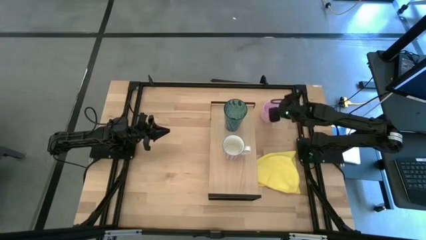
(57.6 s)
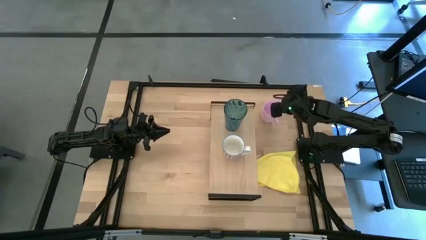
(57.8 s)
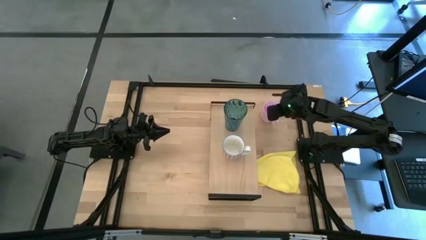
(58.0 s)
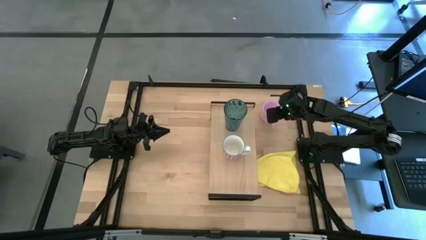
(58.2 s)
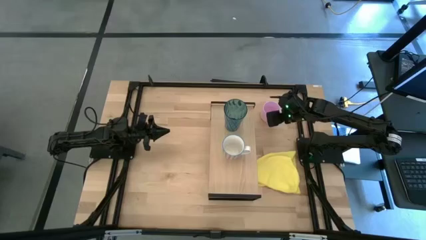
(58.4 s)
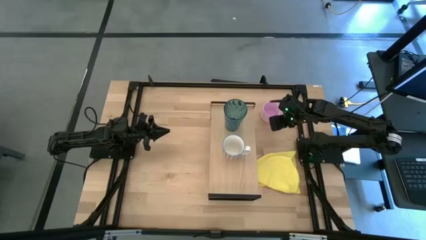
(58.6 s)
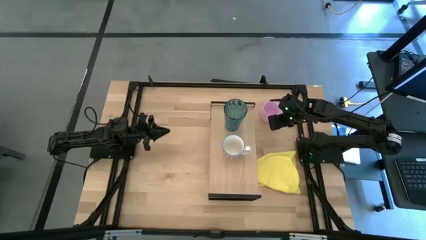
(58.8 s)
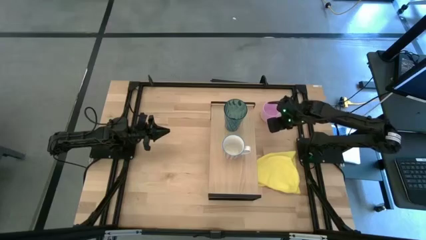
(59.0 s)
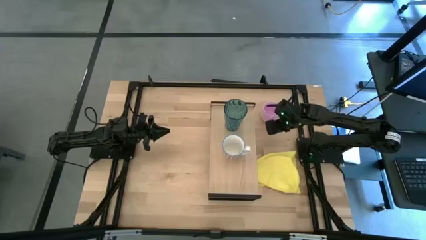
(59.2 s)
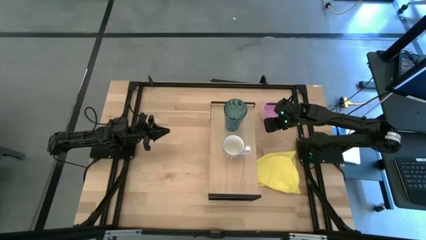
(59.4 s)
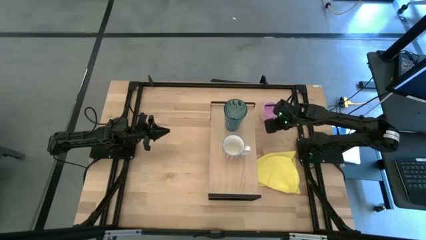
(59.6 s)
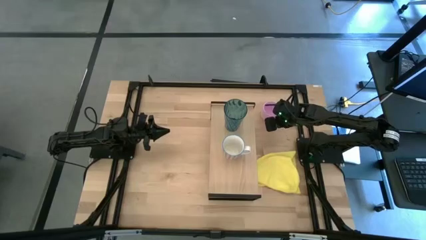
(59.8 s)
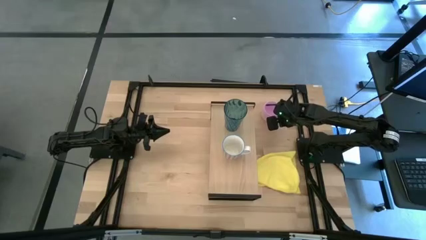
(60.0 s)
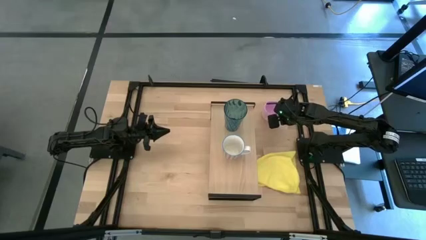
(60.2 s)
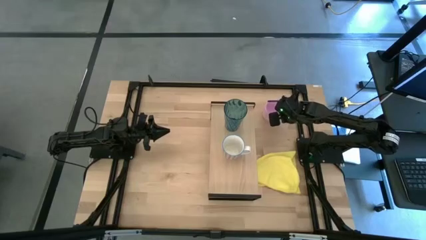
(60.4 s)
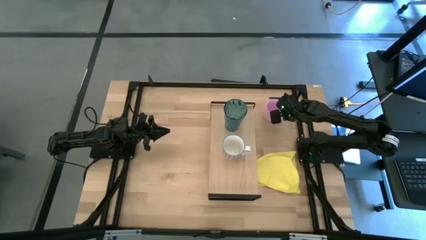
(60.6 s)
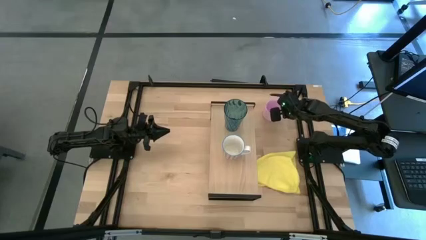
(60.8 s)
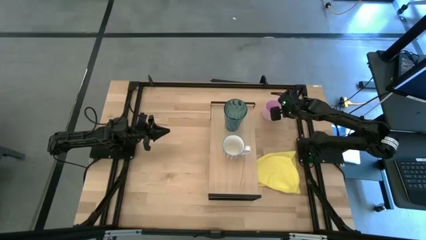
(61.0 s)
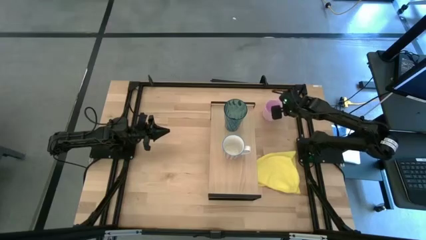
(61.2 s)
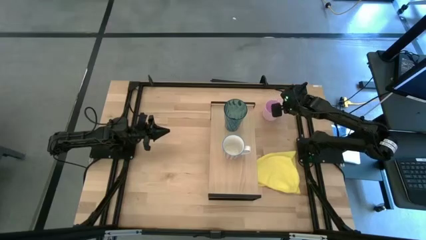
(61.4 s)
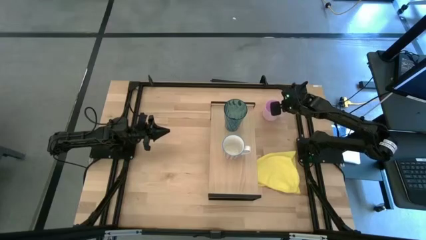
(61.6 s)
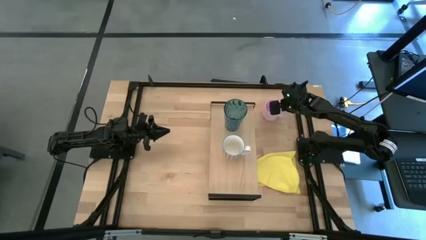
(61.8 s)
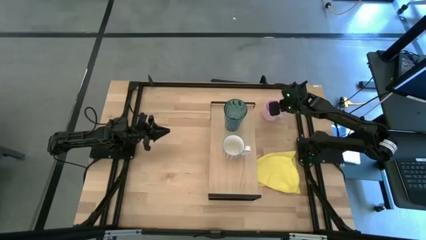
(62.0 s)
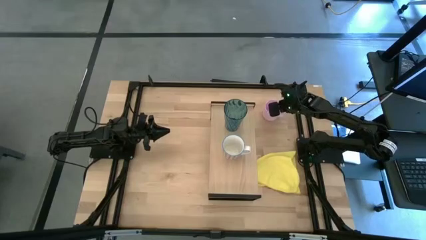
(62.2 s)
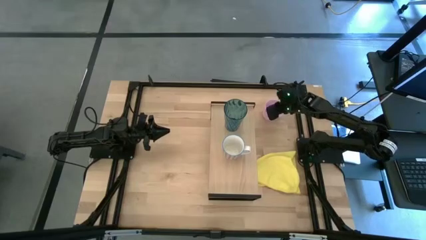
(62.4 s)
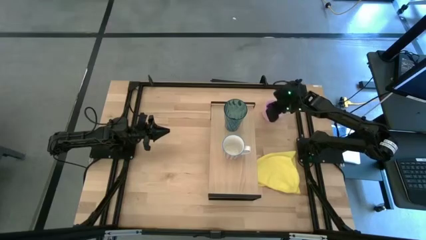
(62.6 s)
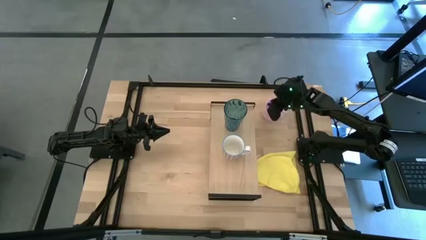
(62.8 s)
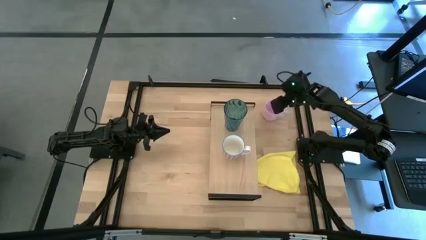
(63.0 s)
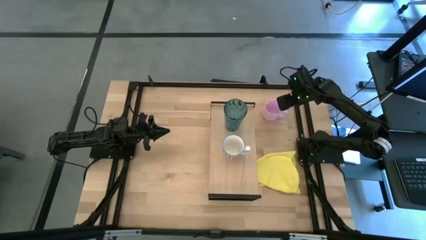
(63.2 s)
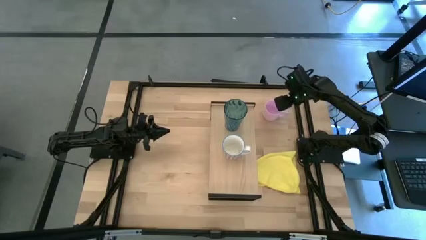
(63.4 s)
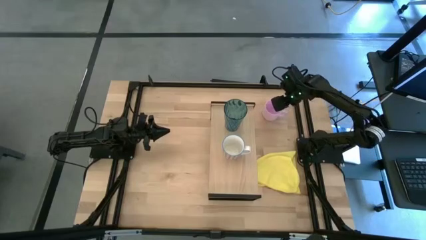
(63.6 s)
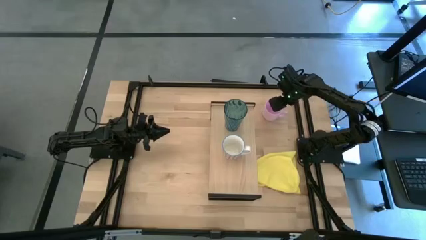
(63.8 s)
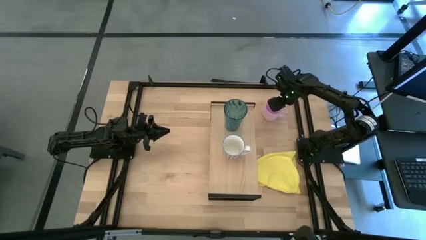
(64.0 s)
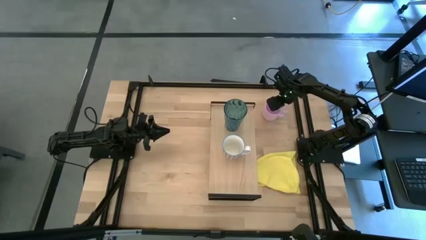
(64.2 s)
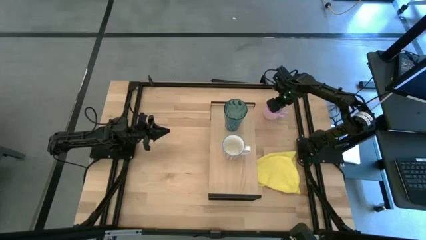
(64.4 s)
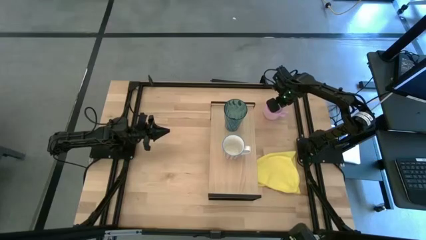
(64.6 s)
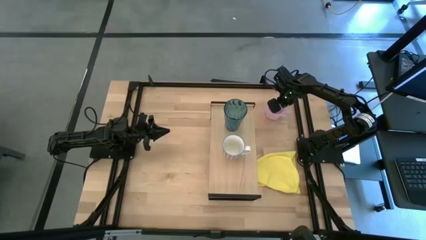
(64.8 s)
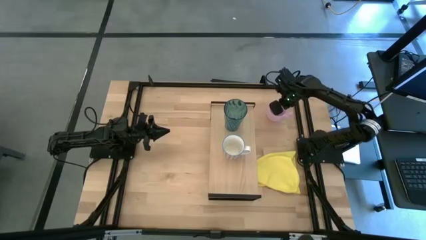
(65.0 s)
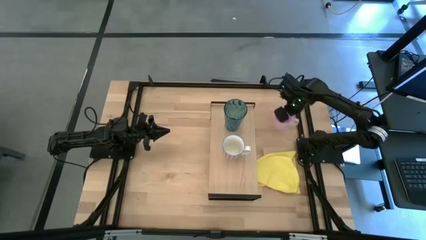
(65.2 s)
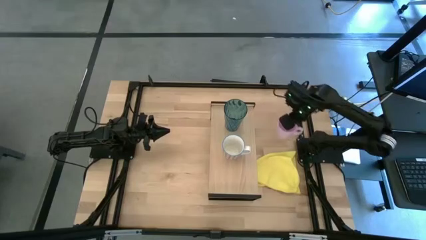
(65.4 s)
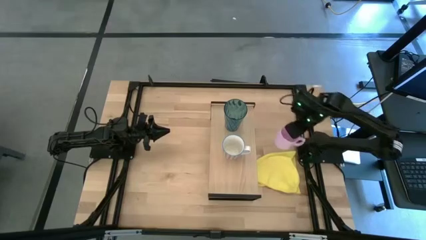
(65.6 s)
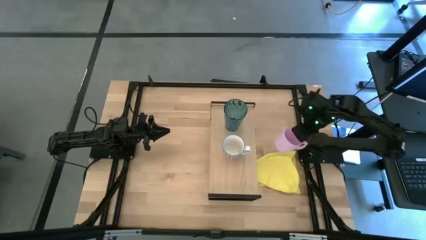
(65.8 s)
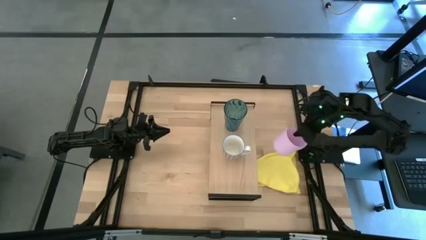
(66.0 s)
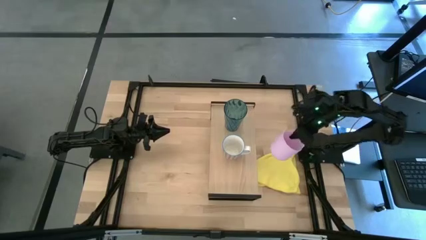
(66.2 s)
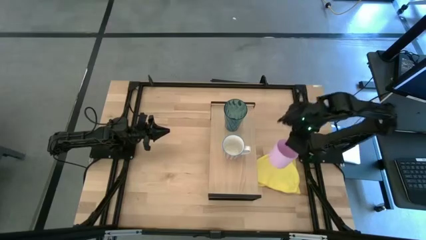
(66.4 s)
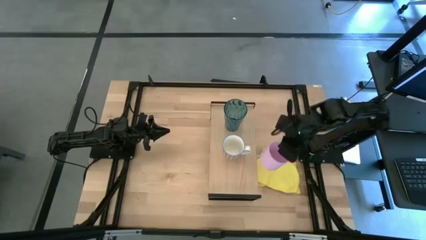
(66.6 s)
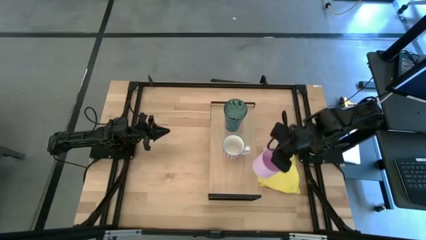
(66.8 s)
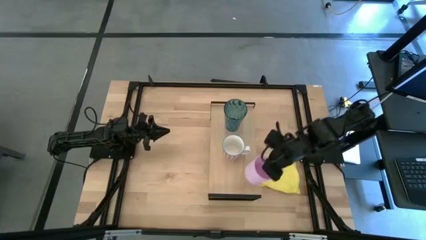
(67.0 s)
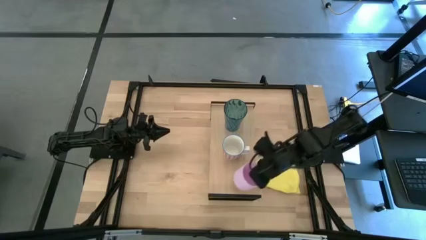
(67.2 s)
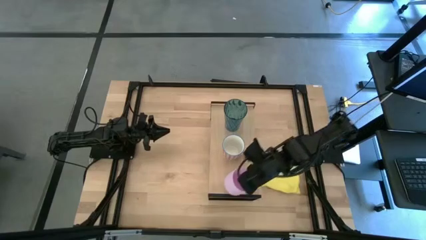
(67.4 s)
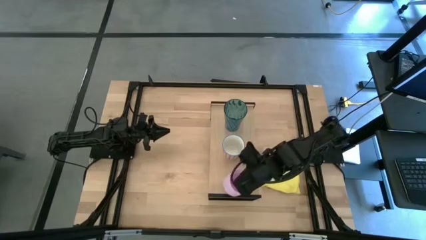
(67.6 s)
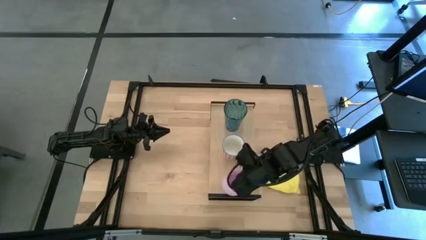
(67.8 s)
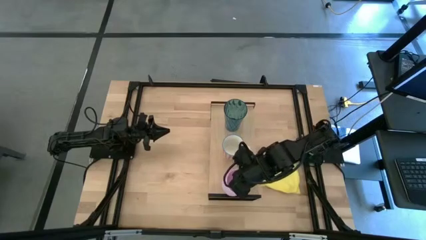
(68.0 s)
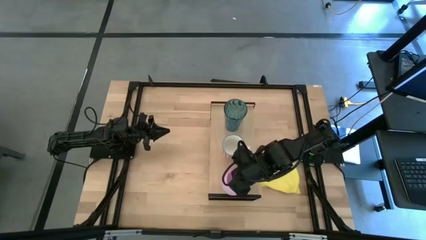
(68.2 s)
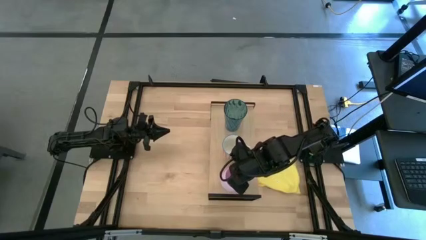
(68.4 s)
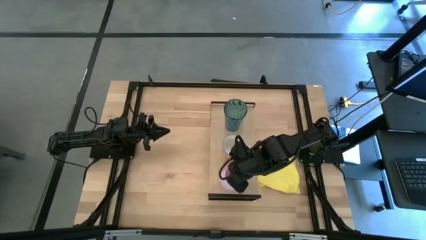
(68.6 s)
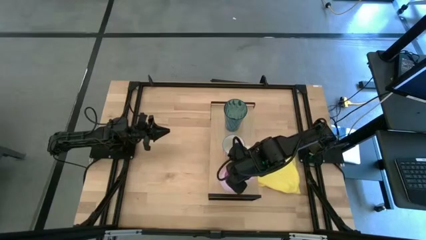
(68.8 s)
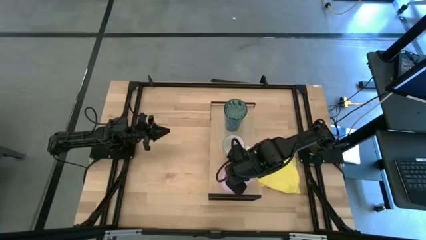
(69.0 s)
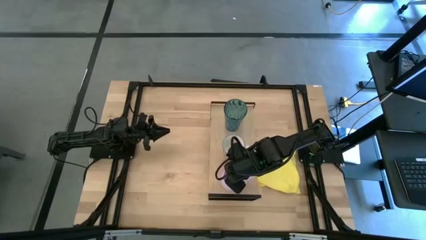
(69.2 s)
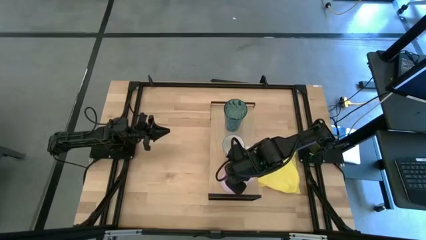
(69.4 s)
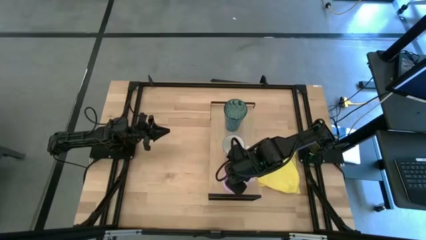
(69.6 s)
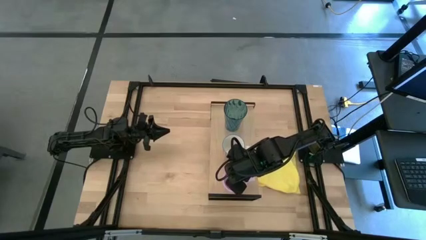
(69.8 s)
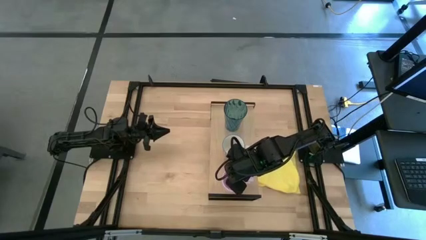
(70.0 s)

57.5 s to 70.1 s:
Task: Stack small to large cups/mugs on shelf
Put the pink mug on the shelf

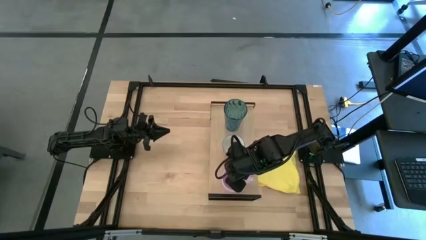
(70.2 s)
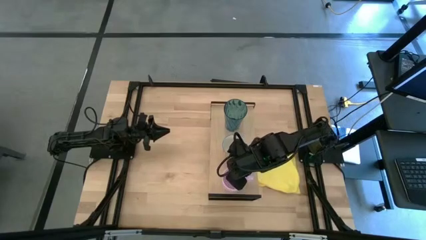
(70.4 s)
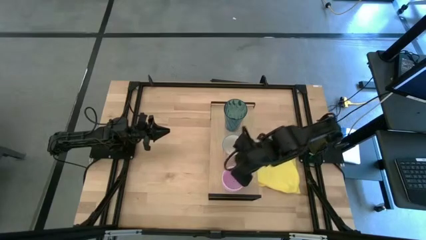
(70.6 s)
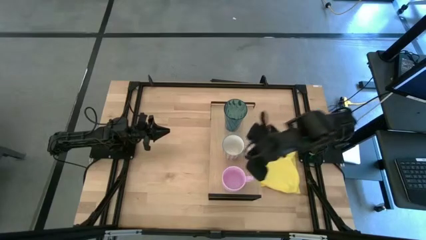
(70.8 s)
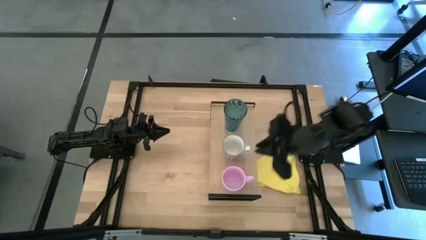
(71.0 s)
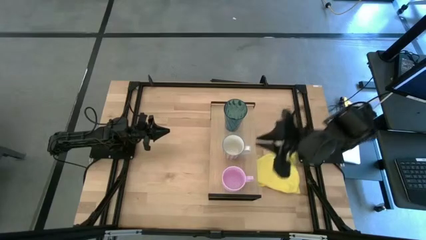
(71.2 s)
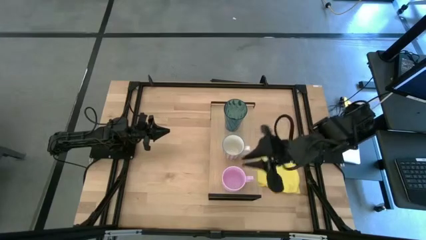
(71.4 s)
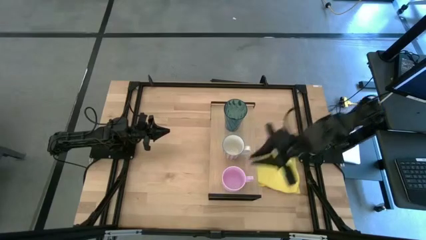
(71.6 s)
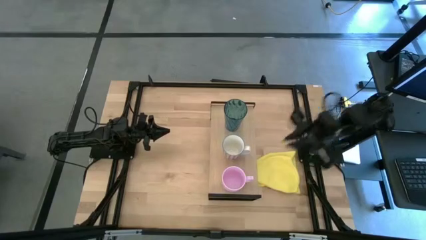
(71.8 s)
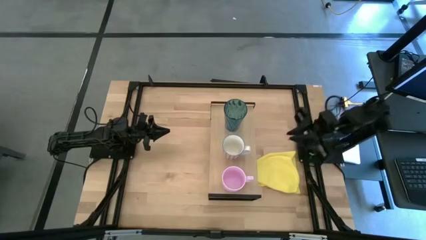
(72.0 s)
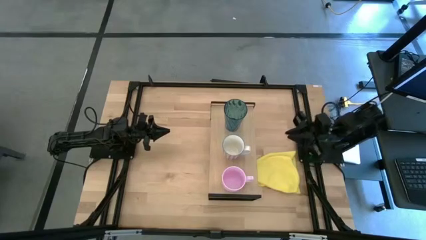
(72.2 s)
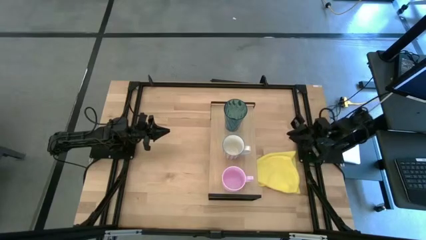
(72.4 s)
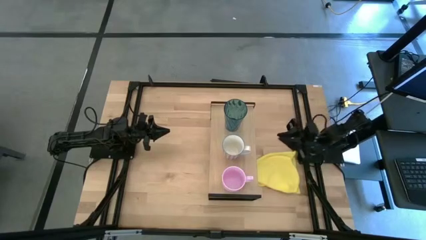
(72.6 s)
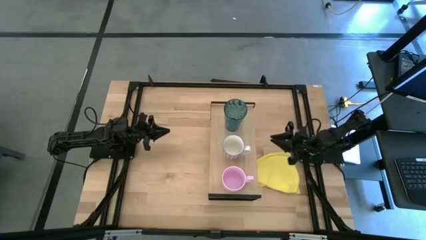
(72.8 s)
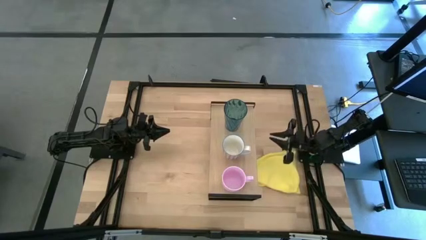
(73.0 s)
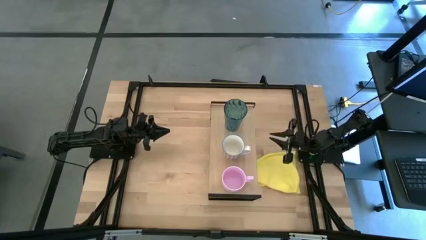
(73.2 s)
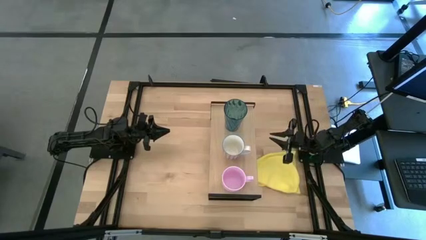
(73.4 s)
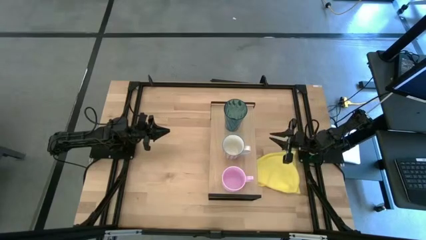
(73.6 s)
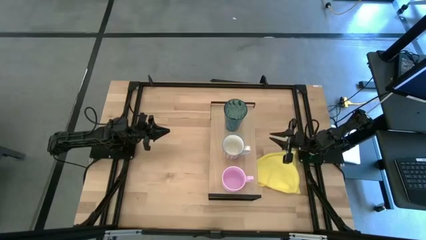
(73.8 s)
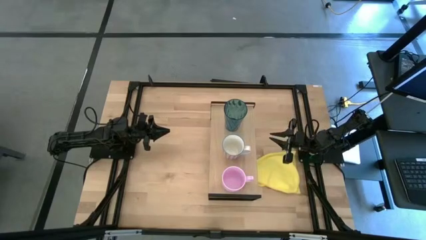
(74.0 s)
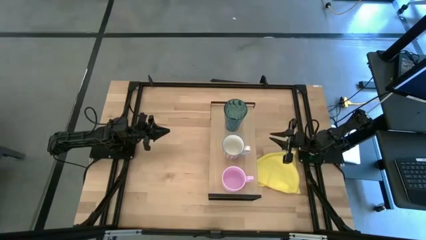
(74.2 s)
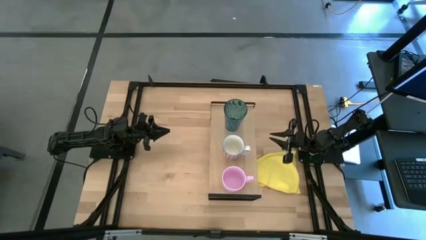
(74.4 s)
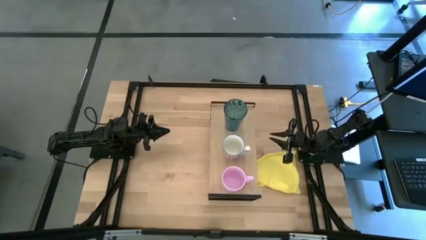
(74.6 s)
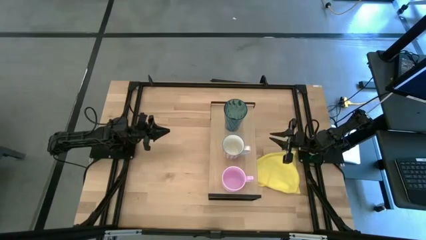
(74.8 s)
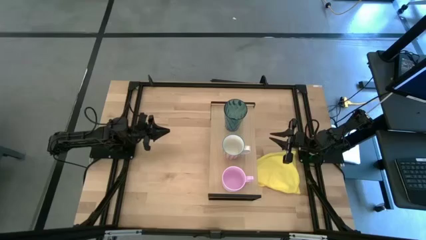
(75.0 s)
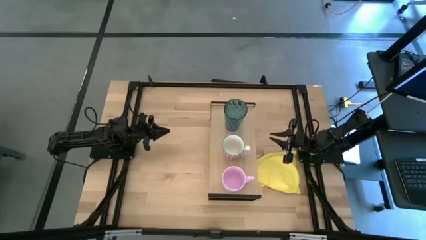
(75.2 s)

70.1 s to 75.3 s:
Return to Home Position
